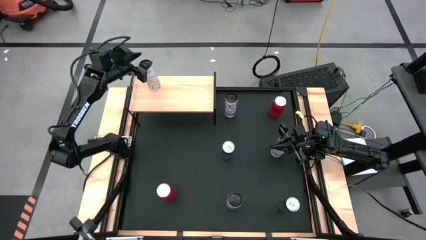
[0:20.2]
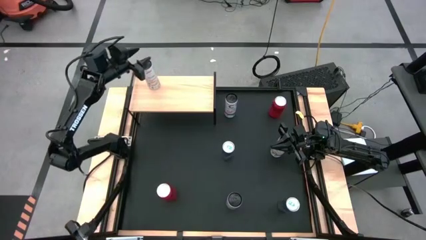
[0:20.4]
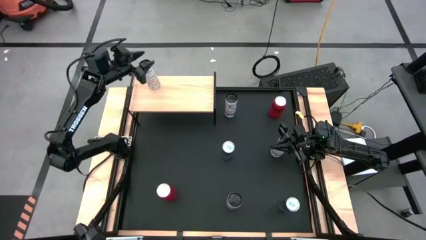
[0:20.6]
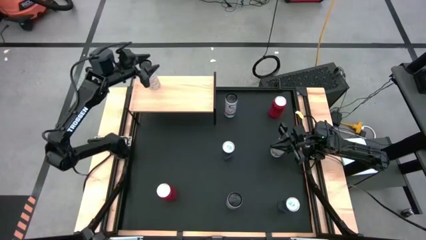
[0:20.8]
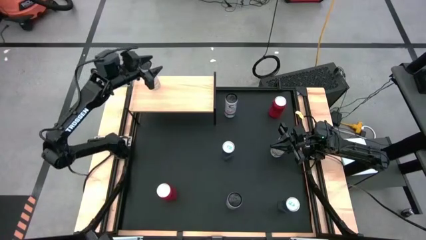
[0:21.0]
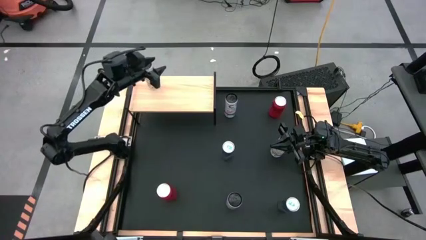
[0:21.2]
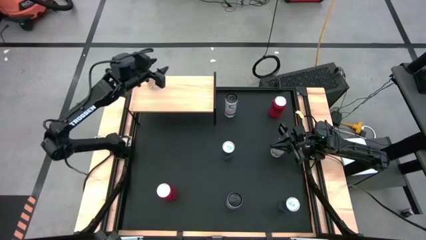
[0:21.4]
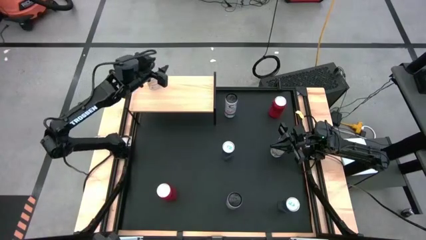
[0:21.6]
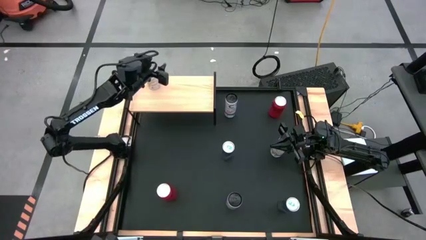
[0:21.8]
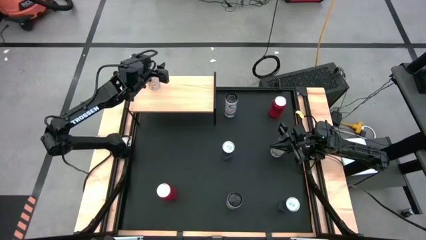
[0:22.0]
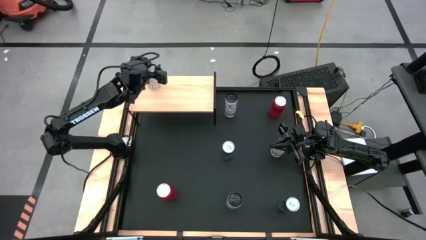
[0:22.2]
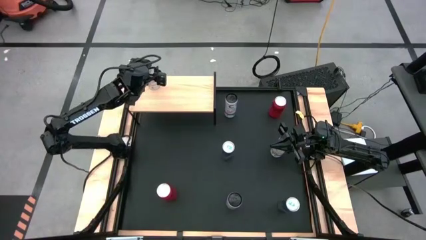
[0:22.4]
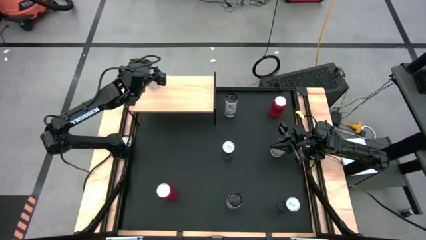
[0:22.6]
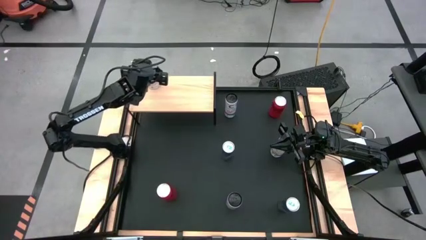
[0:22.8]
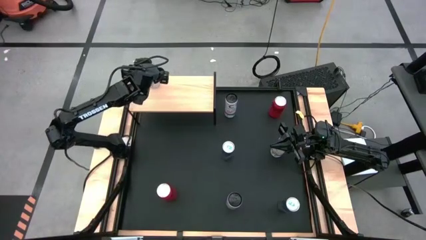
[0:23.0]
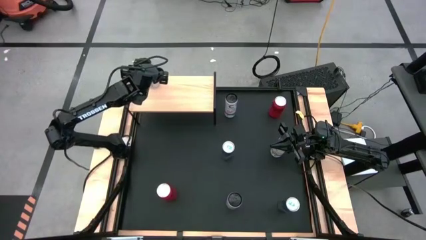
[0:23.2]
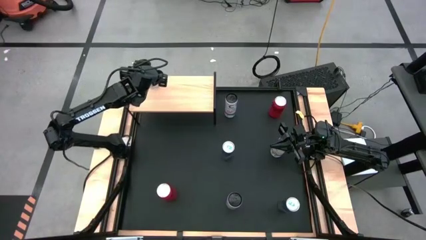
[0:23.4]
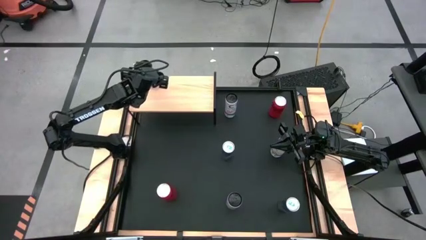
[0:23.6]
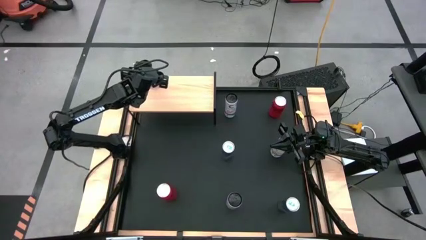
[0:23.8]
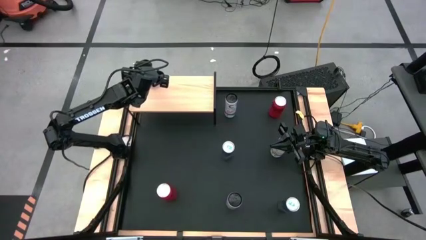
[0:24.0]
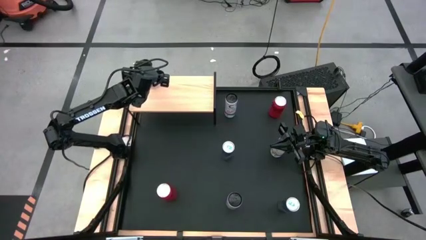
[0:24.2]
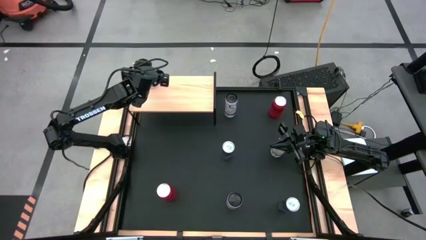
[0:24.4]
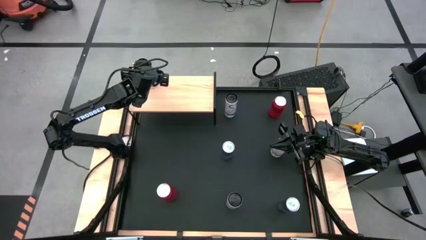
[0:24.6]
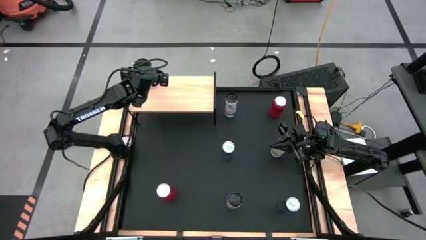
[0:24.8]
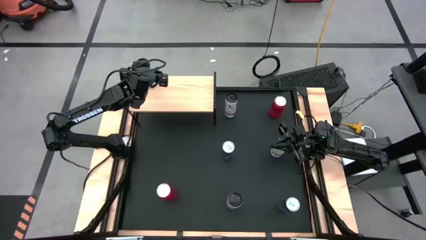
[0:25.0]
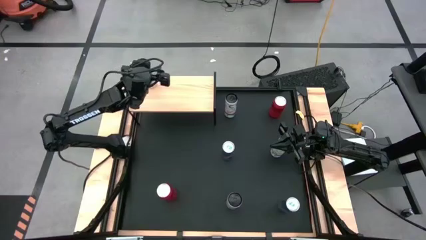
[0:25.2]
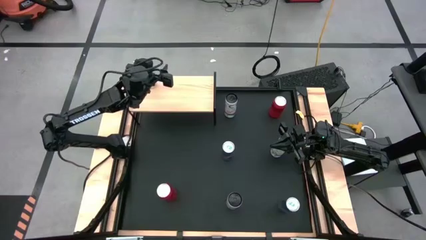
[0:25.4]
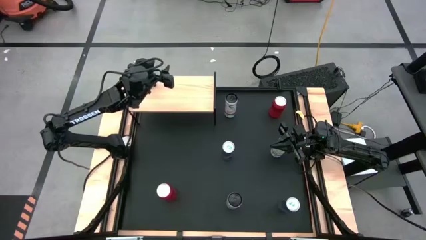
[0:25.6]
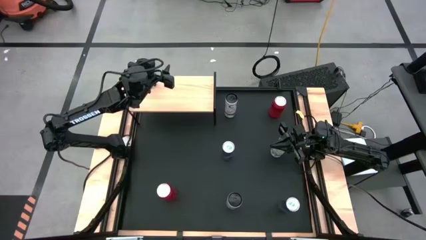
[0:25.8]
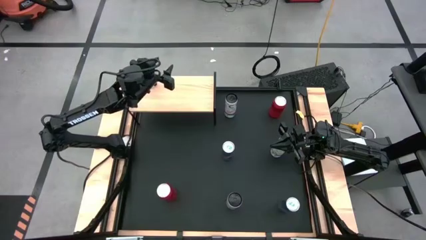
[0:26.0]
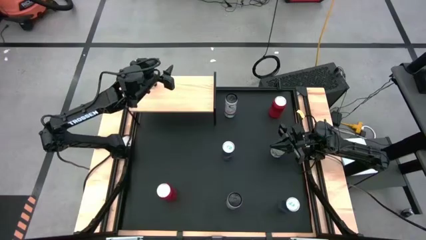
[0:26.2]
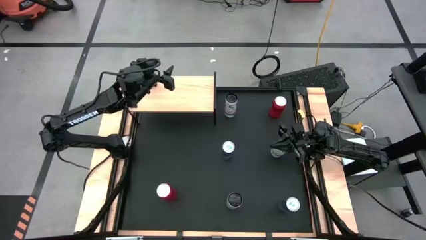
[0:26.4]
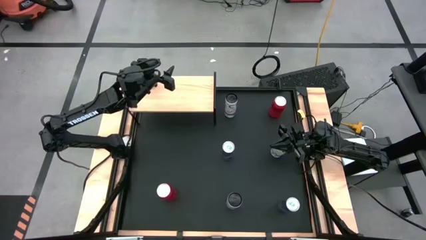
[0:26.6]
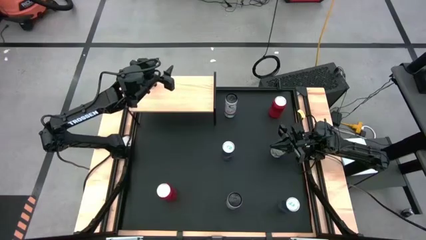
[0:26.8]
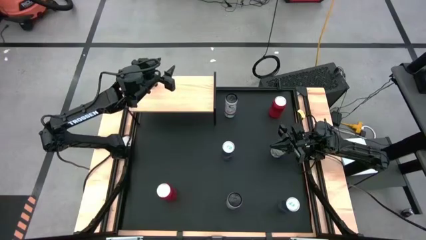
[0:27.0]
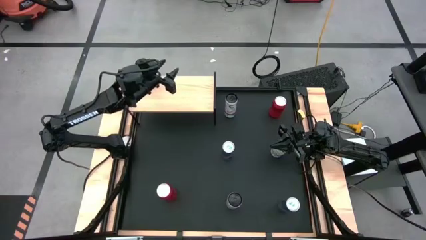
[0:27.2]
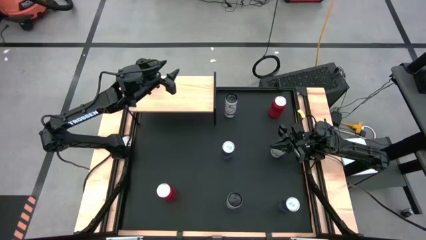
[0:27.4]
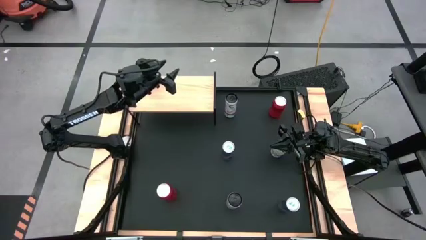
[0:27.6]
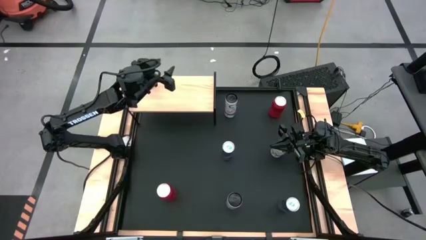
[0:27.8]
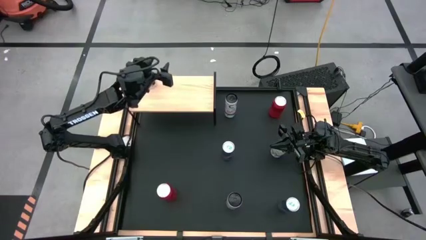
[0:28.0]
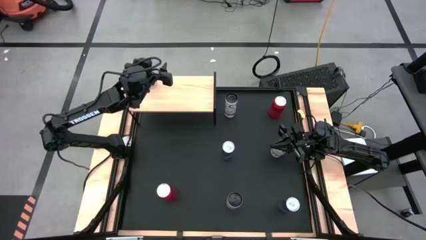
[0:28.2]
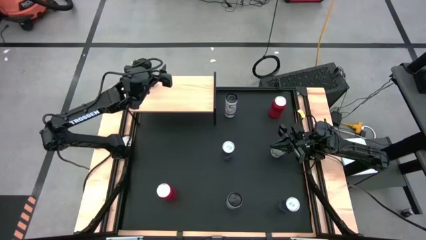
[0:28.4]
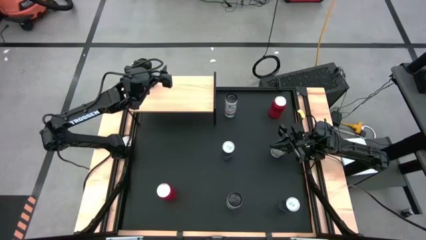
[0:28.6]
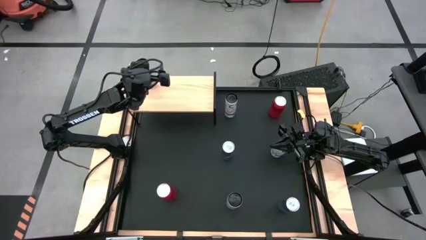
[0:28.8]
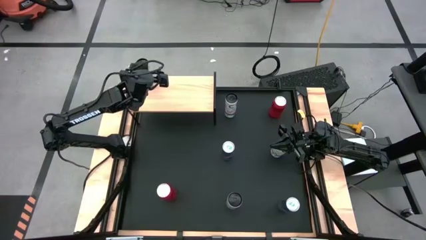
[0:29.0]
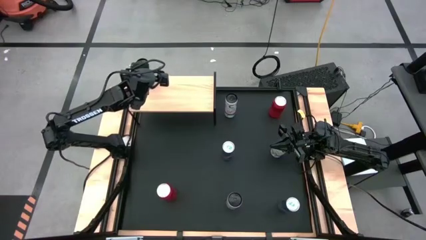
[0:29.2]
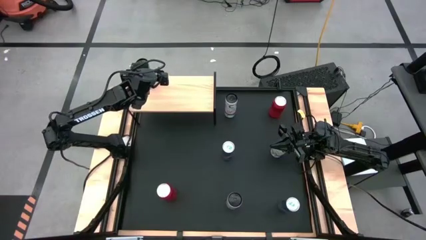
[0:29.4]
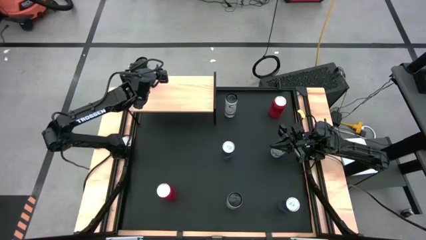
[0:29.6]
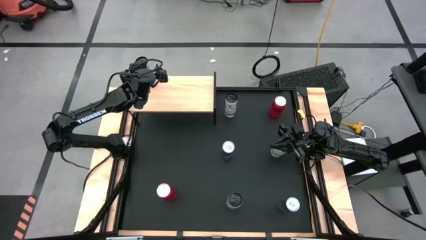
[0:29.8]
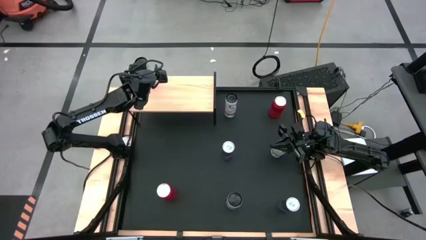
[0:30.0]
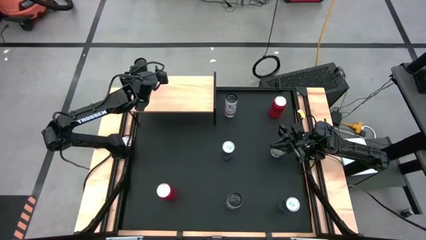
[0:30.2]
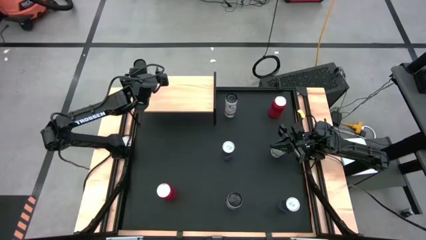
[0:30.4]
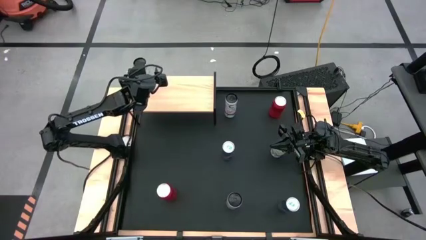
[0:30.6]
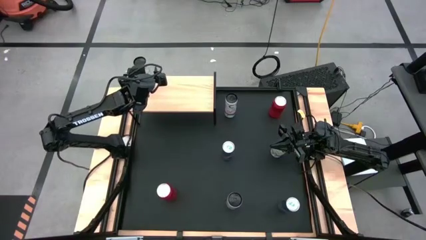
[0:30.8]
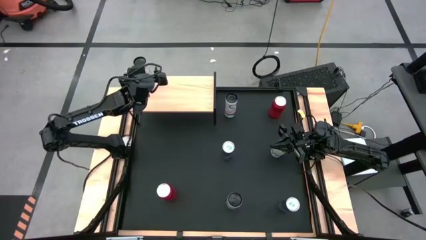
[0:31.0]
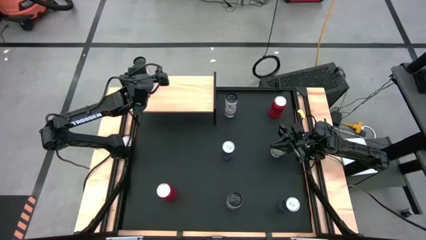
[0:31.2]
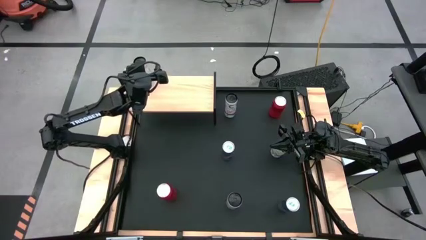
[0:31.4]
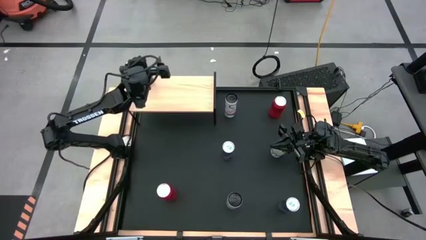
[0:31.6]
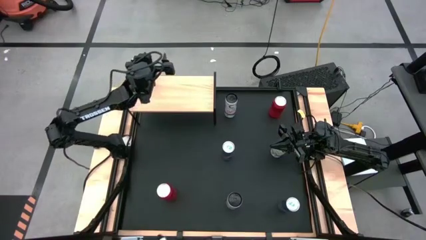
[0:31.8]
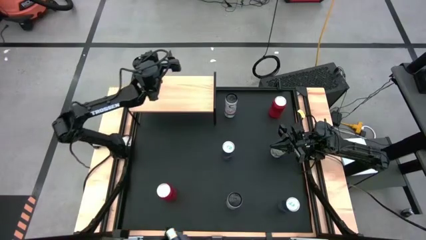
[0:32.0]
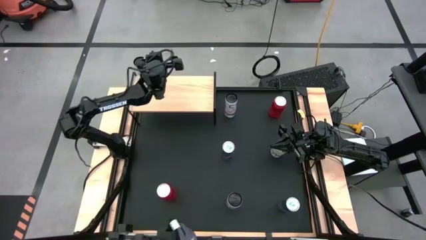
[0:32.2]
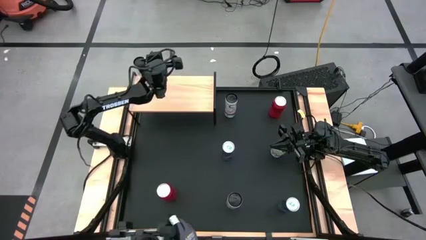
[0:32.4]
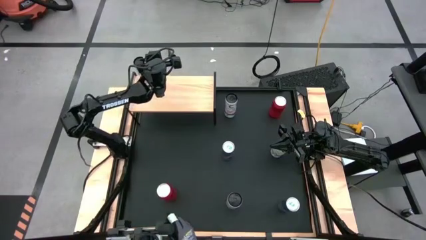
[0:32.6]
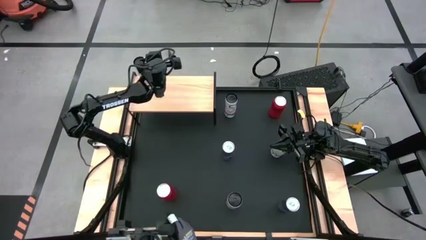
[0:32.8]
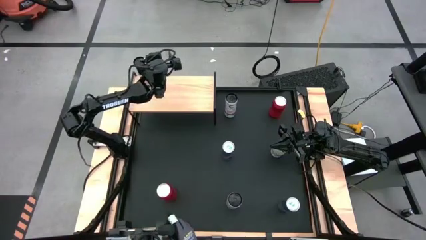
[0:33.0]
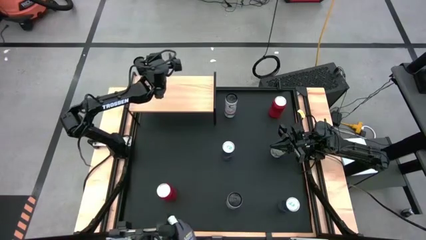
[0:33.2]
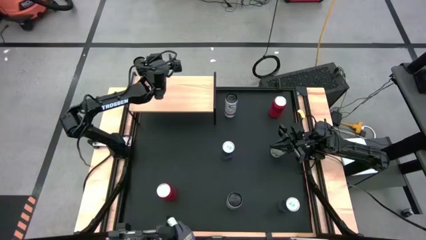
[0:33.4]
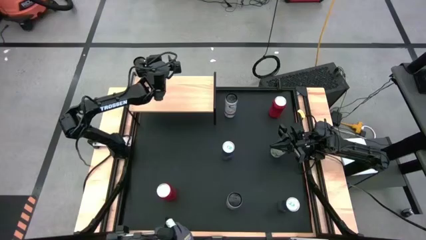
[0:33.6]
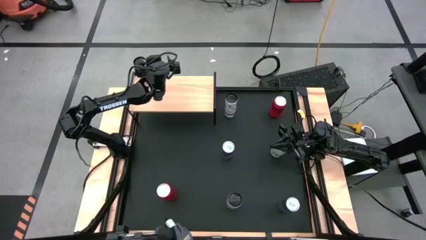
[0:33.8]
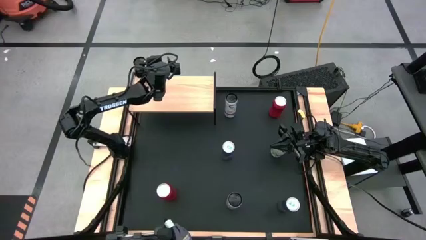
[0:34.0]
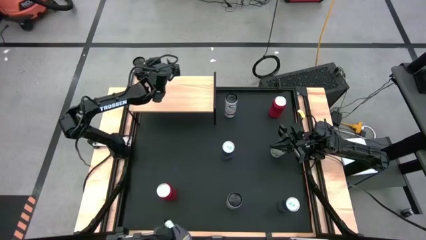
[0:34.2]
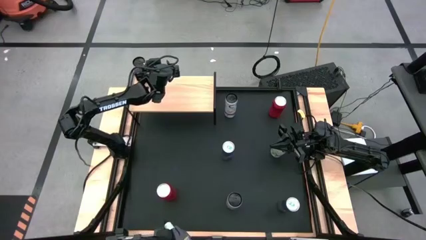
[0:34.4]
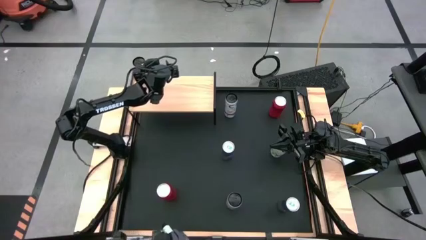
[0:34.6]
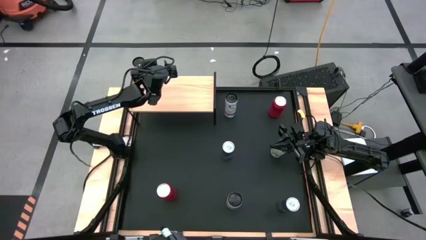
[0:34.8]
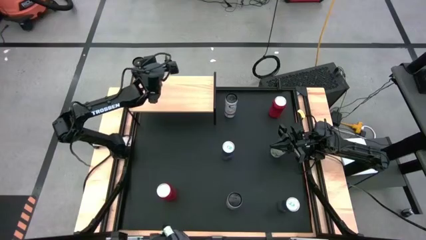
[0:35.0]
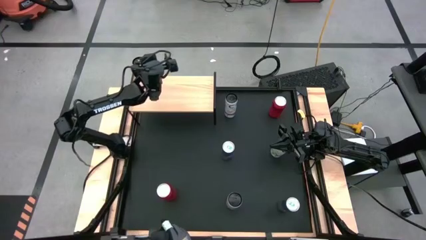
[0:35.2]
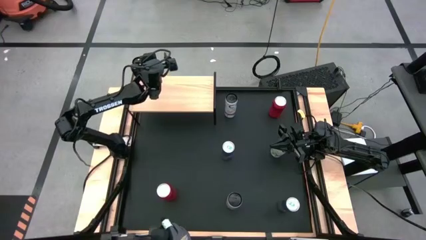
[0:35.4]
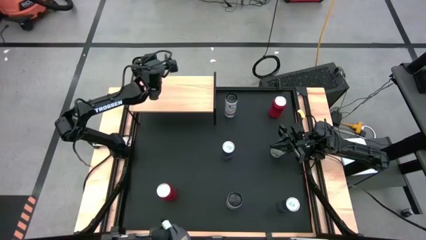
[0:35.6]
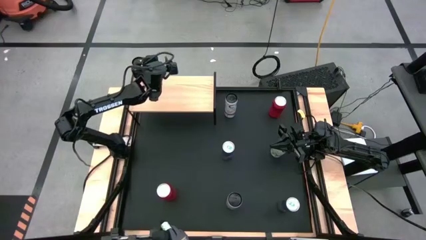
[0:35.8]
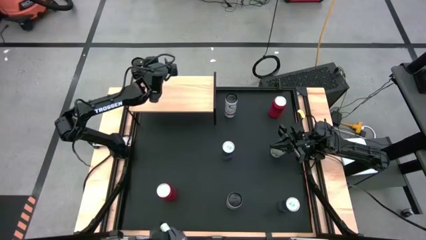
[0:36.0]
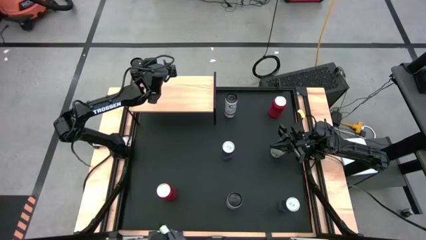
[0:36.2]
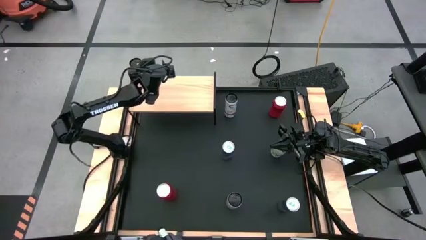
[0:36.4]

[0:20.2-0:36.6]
Task: Place canned beverage on shelf
Put the left white yellow soda can on the shelf
